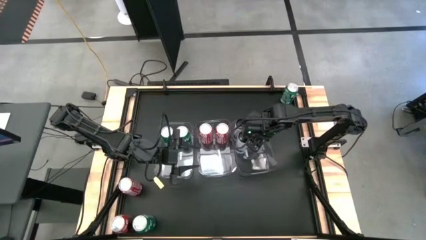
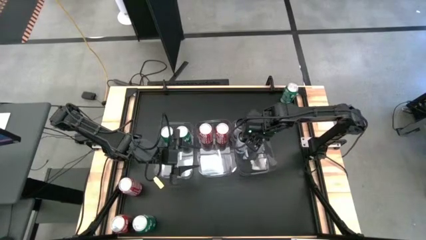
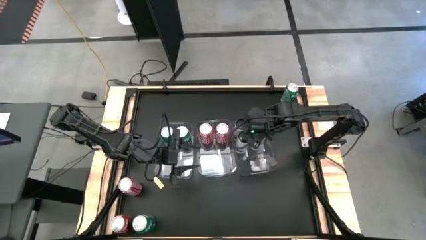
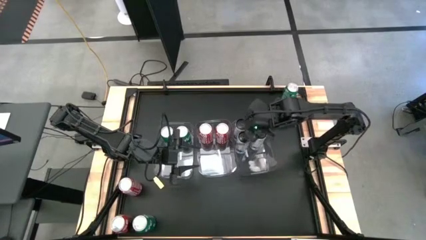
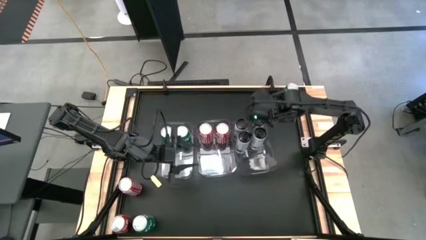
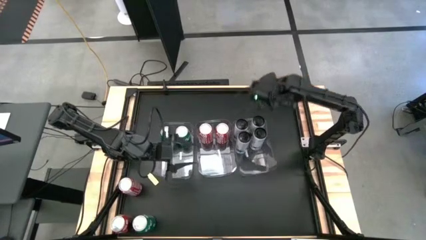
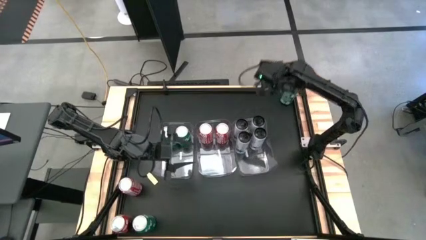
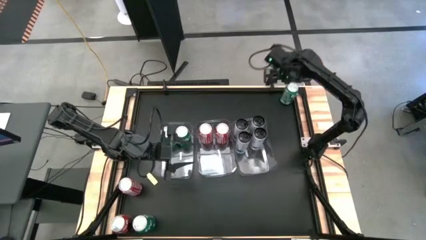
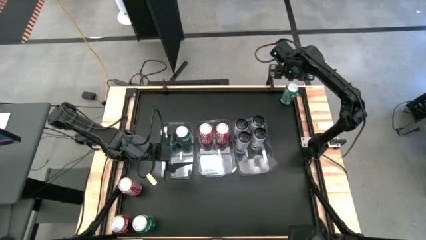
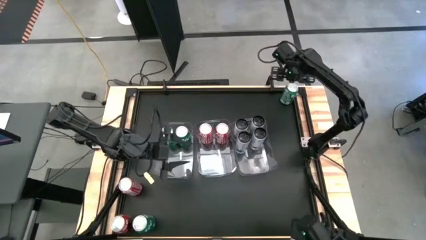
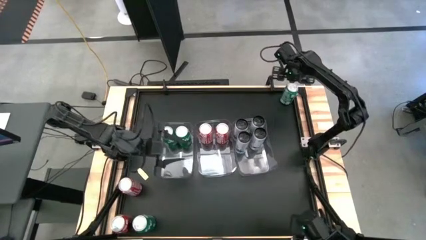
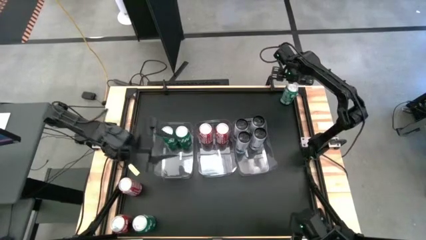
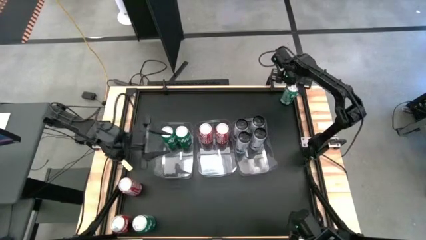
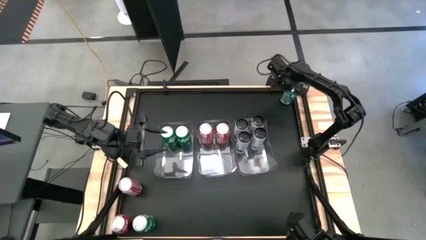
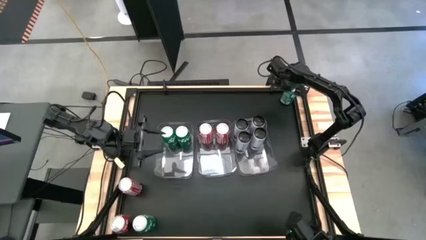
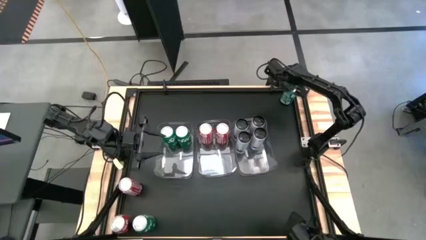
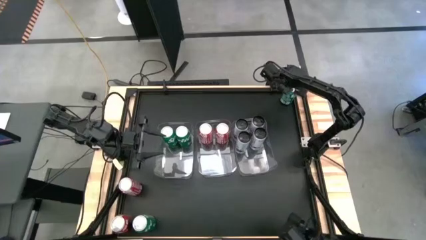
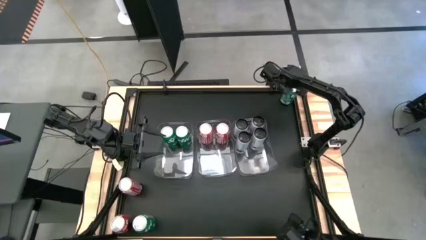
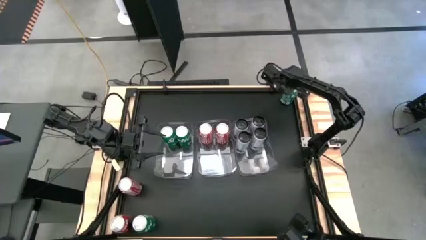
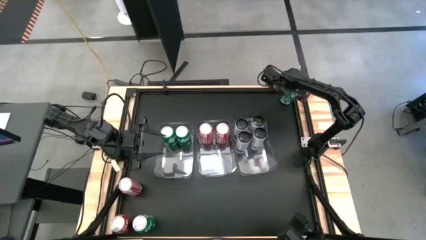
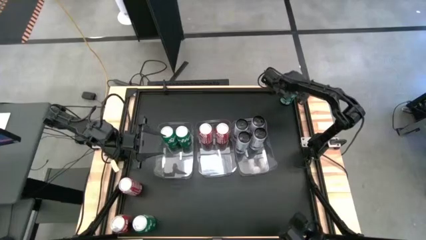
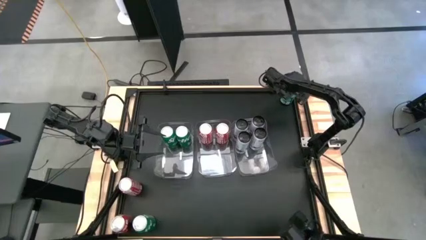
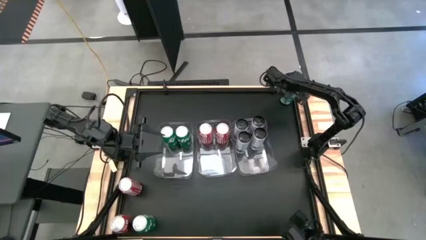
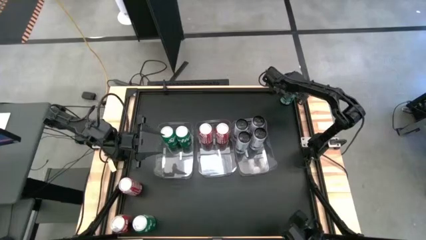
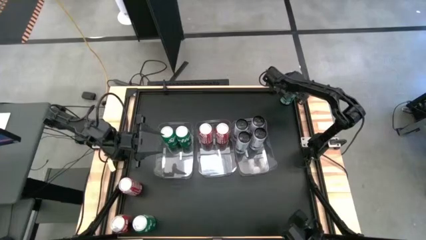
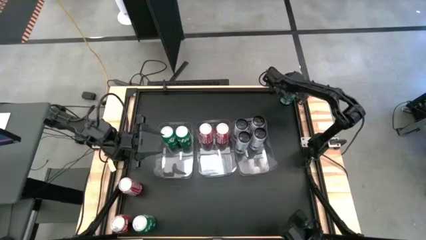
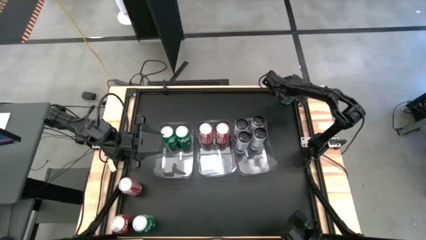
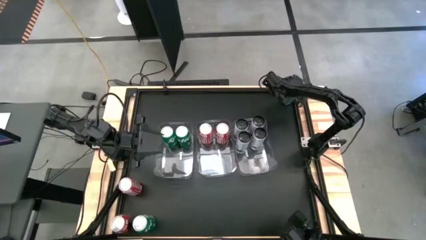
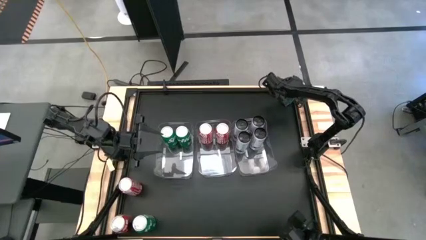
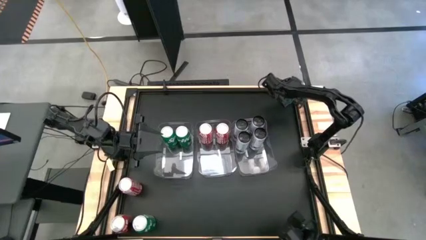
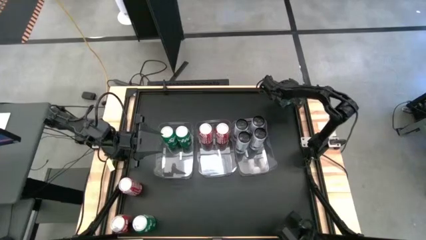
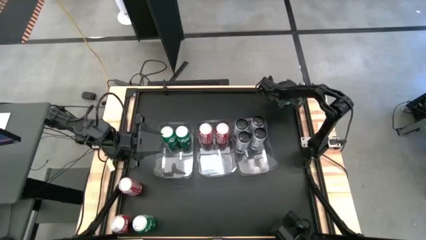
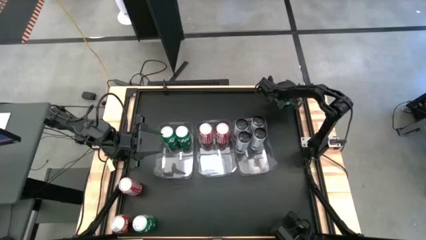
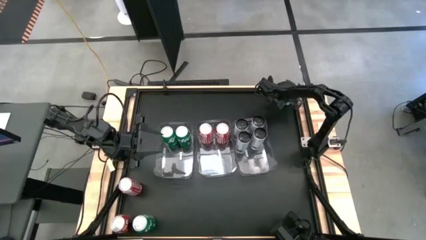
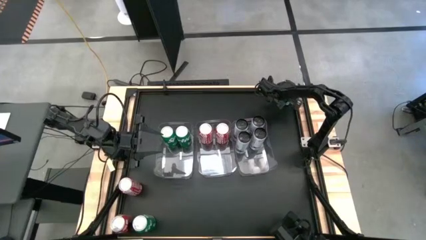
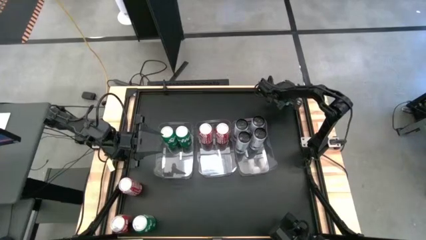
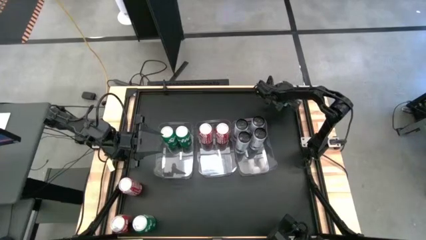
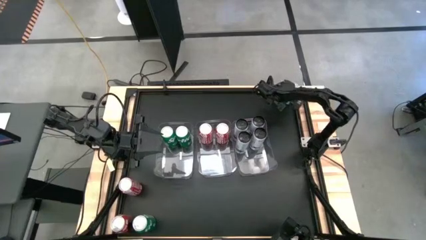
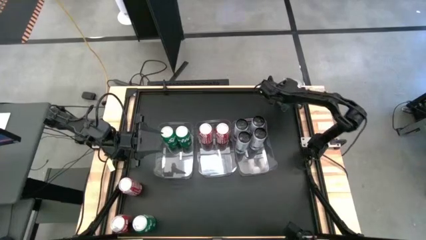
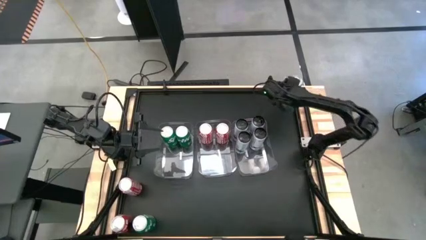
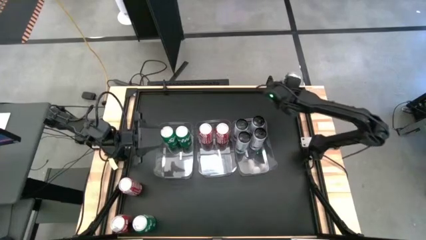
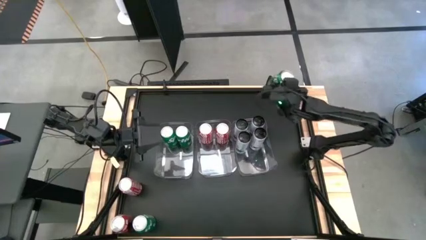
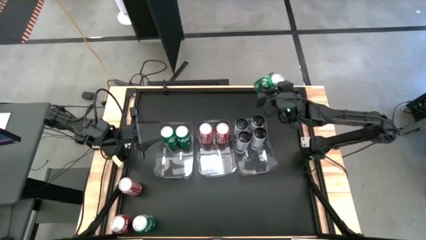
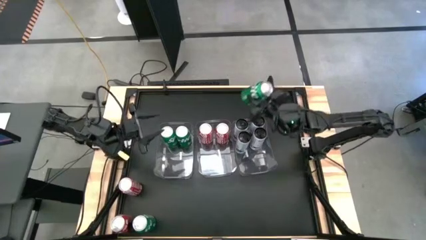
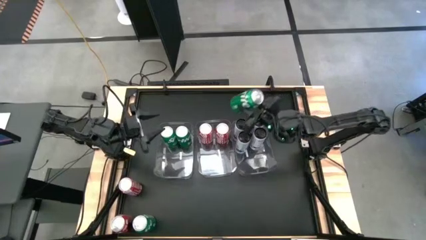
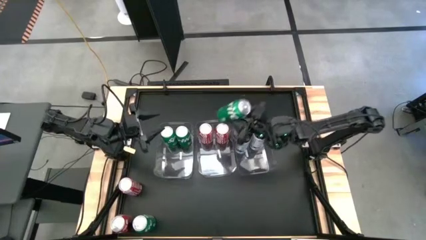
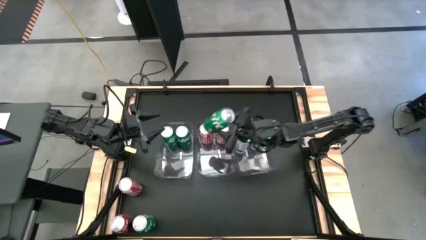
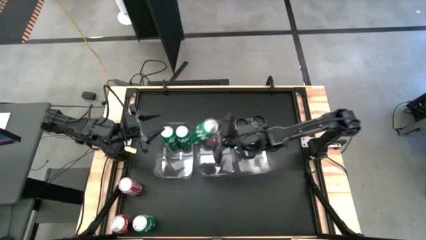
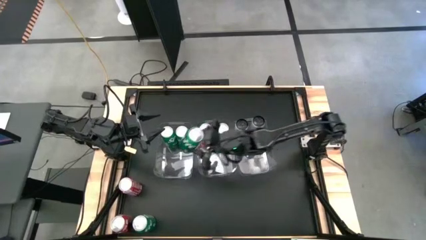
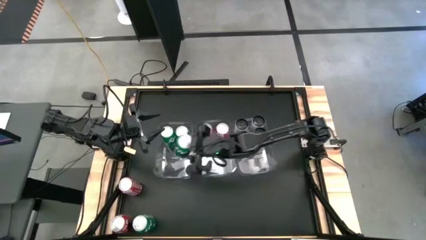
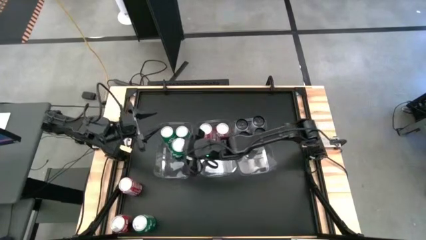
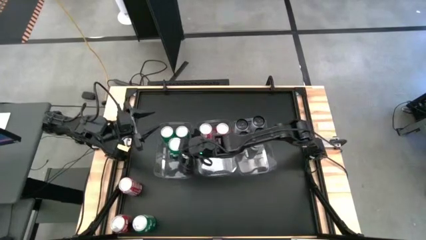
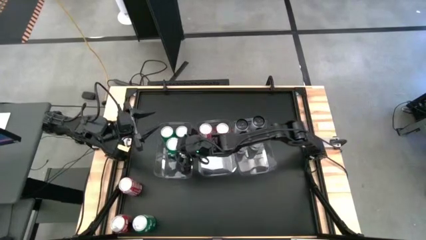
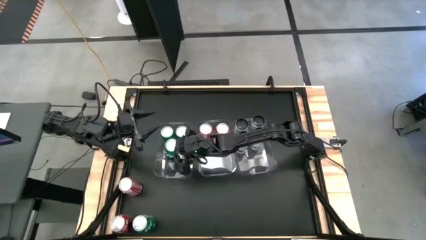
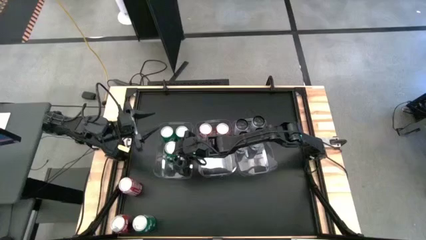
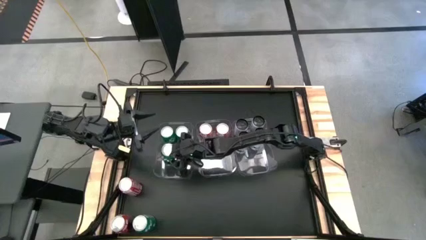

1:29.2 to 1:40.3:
Task: Sort soda cans
Put the top green soda can into the left transparent bin
